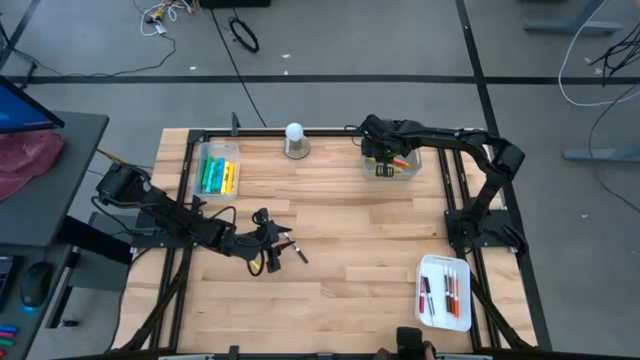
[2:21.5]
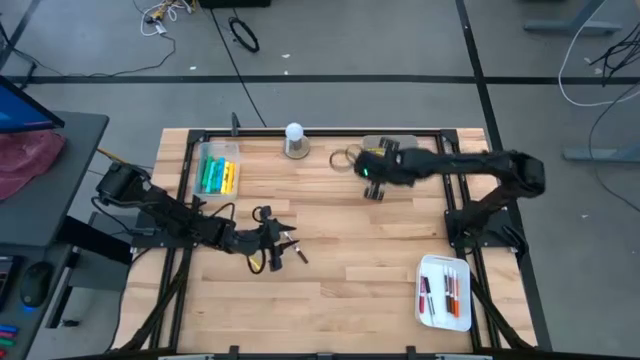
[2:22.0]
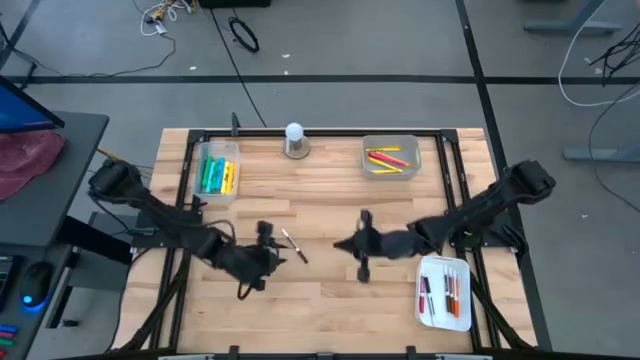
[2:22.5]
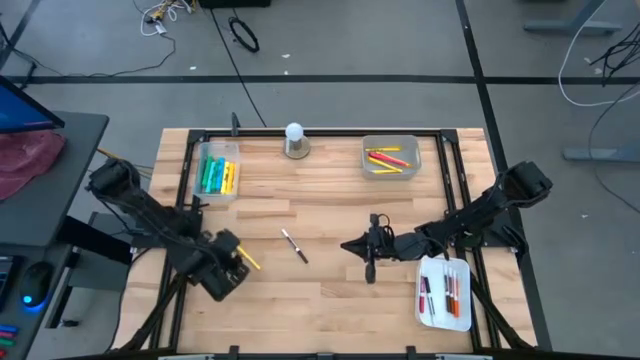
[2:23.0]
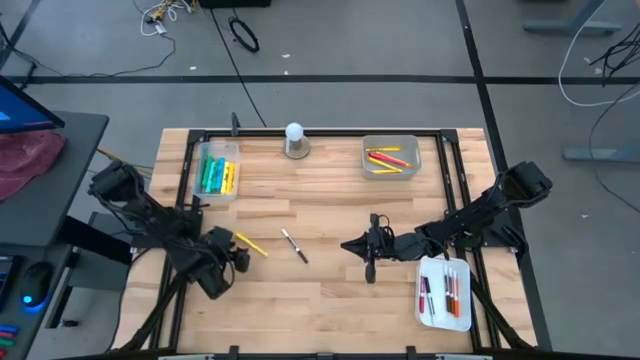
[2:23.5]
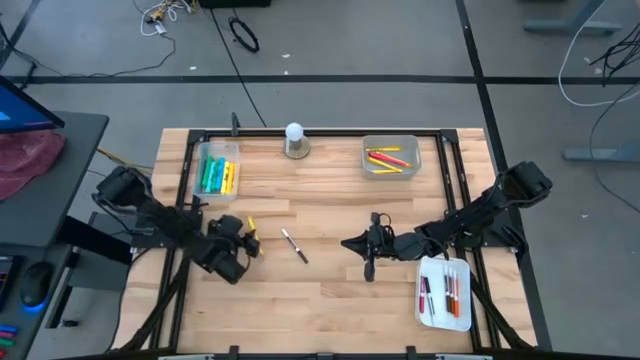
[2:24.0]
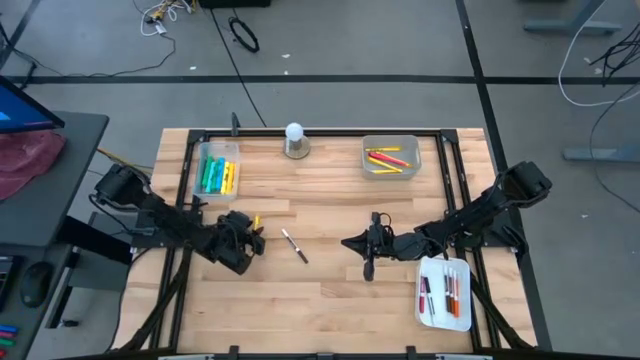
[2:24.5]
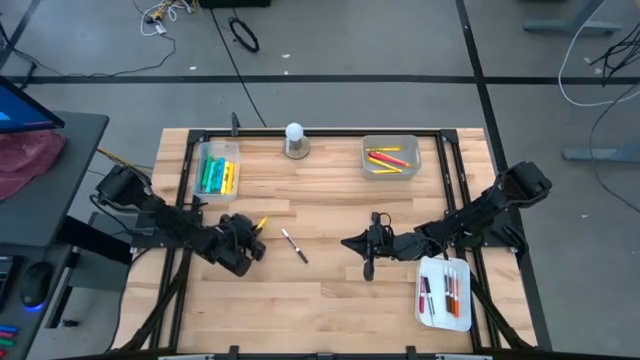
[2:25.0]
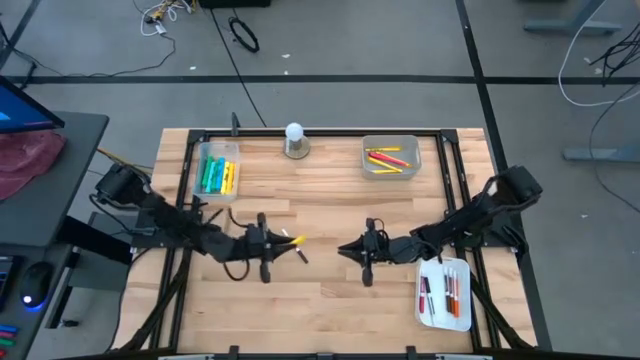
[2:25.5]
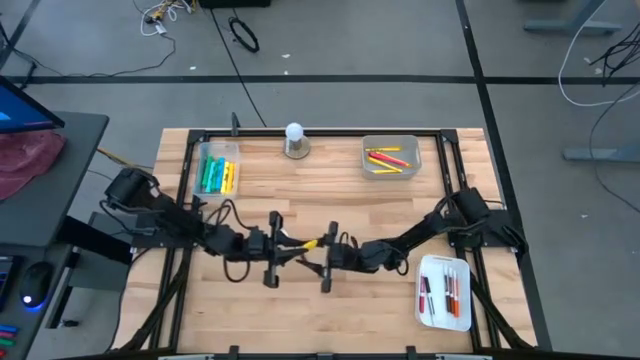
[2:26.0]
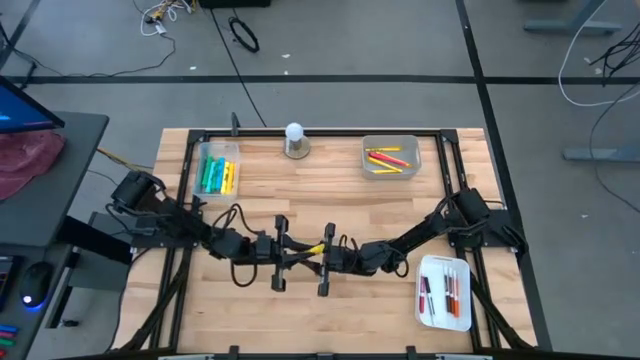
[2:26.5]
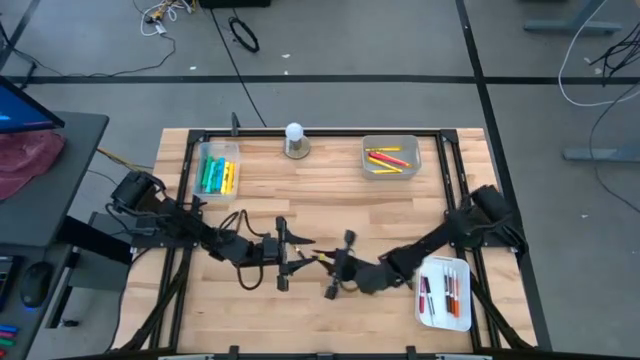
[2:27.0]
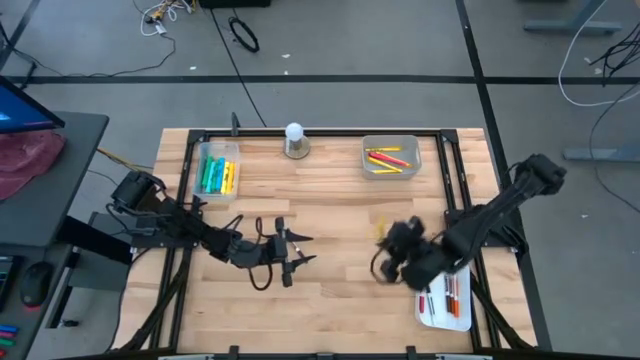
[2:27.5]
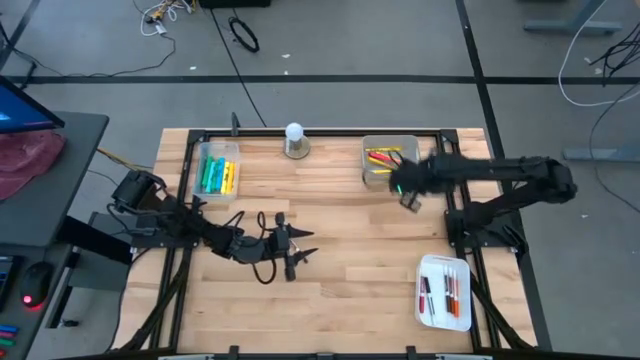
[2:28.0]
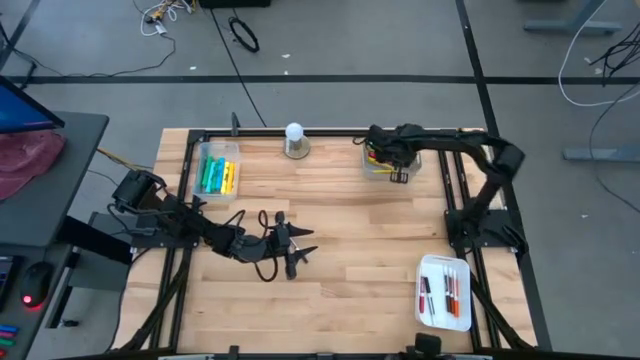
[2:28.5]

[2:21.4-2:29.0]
Task: Pick & Place Markers
Put the yellow pen into the gray bin

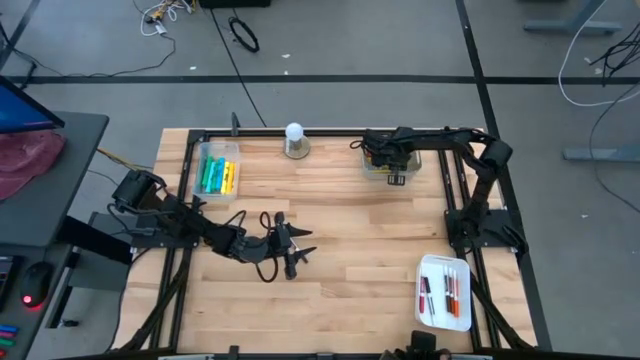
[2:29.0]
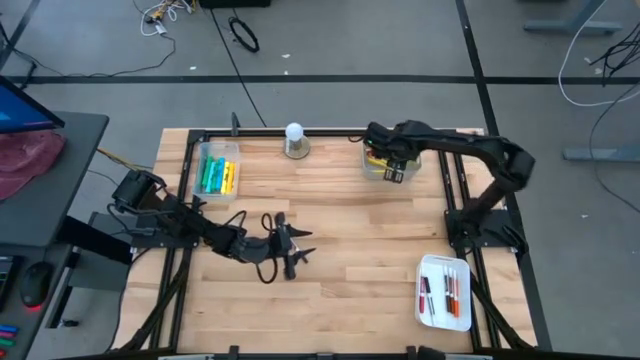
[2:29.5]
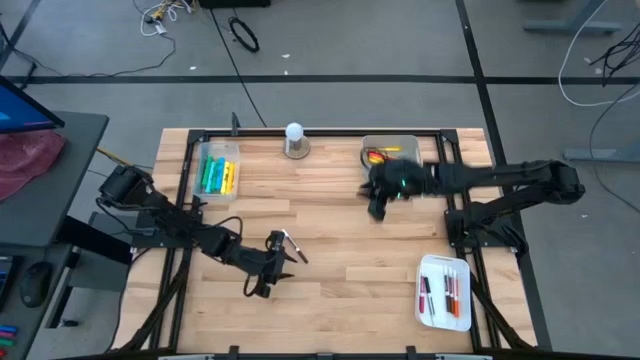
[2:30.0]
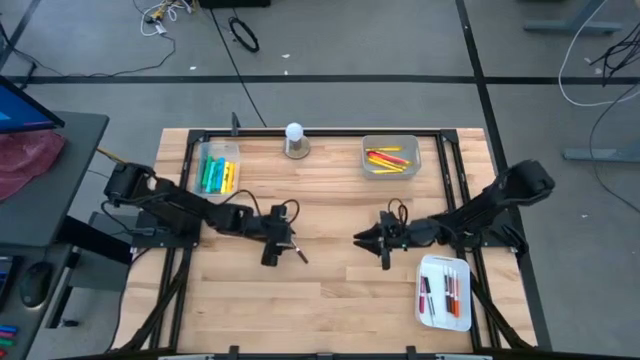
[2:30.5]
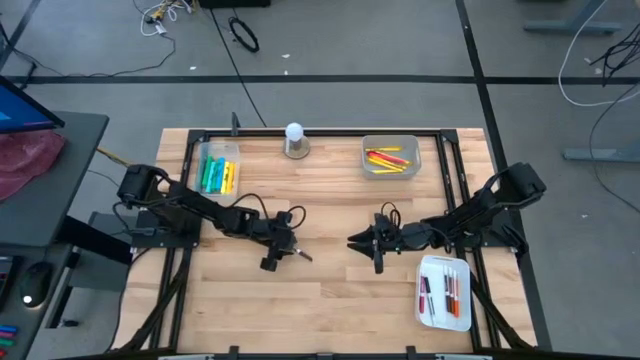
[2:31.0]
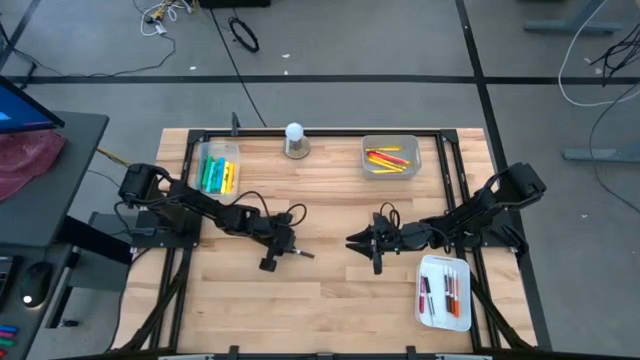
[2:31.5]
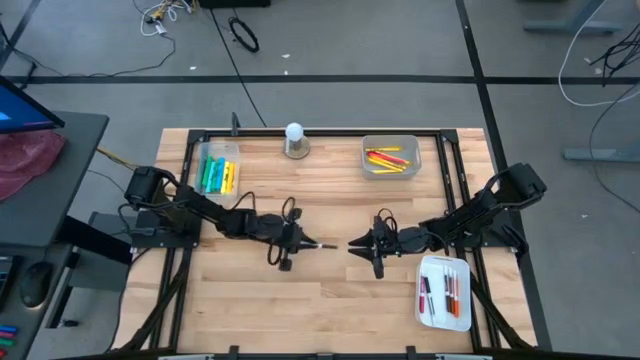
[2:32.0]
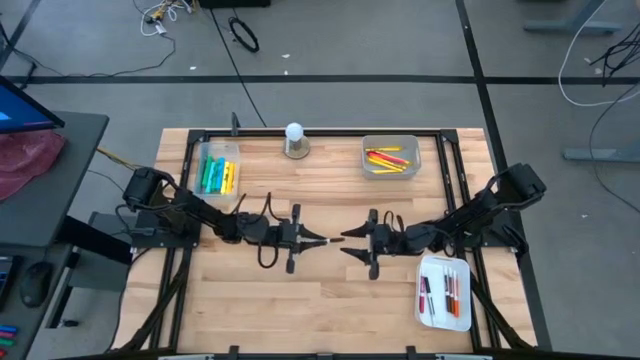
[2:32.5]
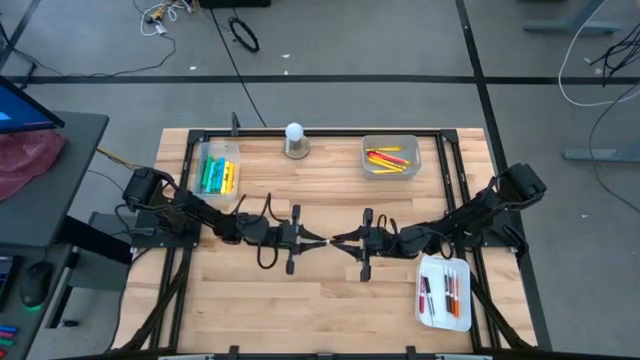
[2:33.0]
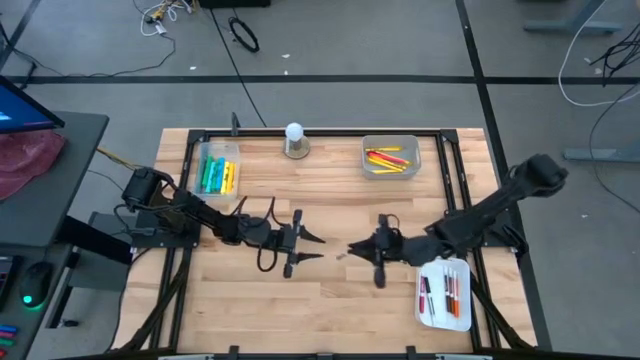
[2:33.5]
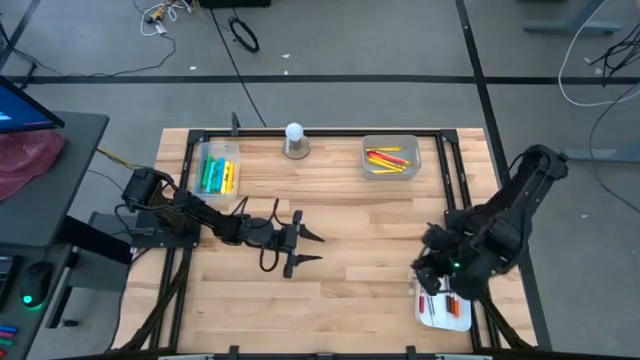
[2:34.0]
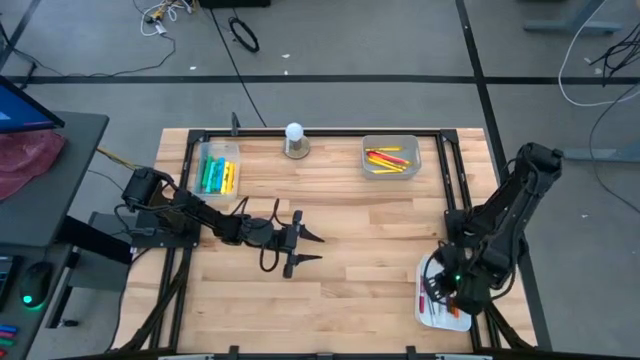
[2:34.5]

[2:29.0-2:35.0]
Put the brown marker into the white bin

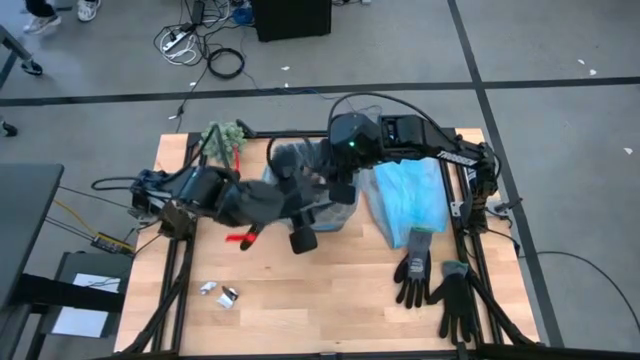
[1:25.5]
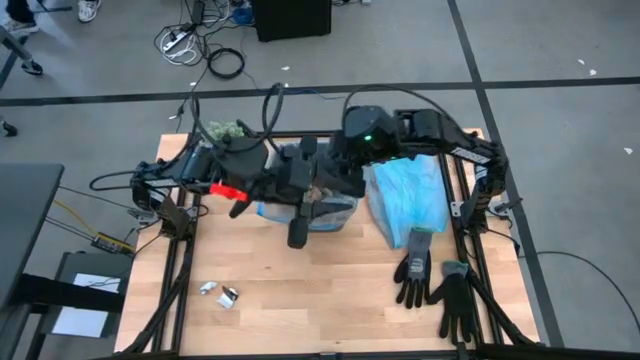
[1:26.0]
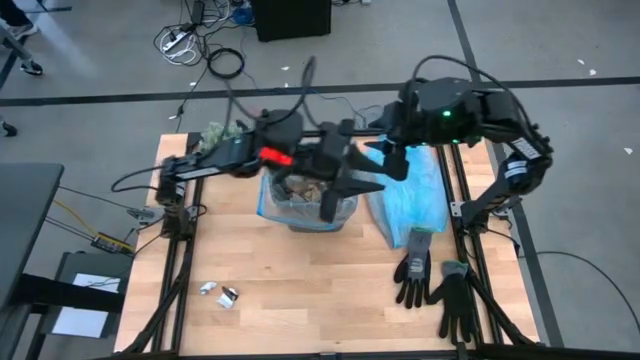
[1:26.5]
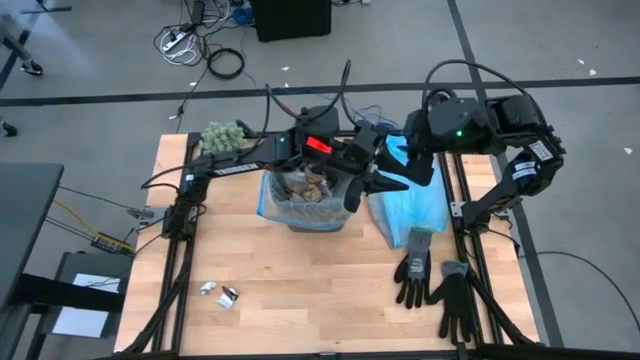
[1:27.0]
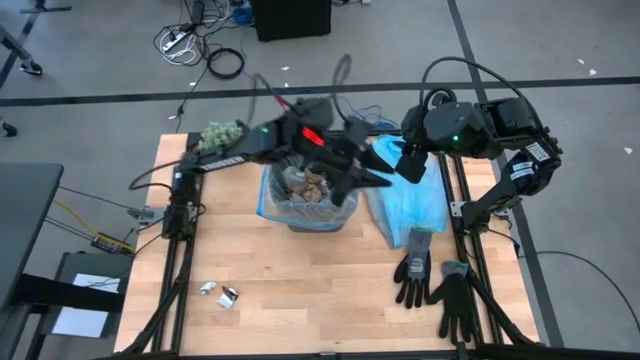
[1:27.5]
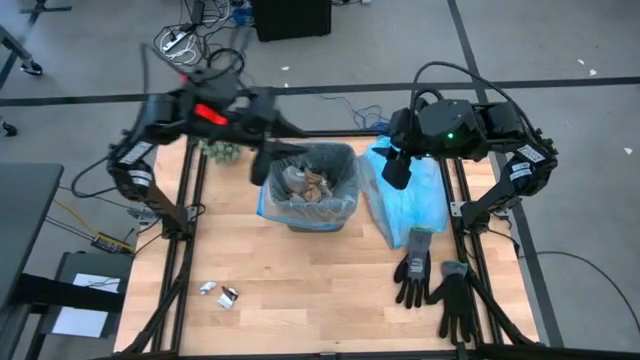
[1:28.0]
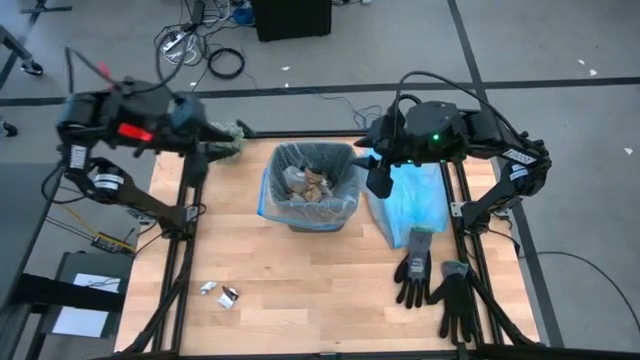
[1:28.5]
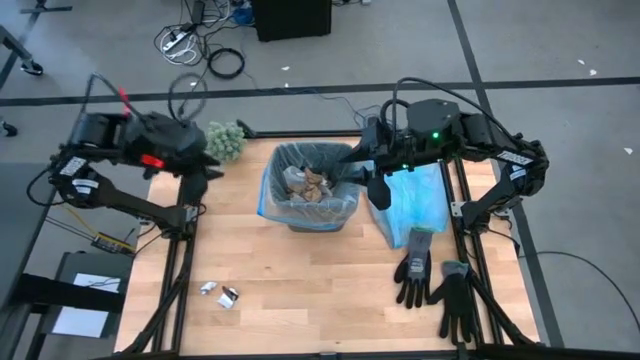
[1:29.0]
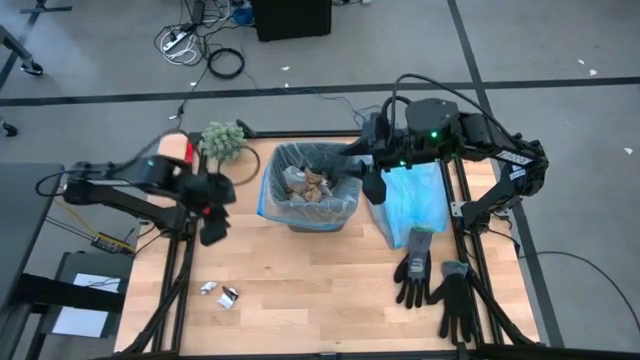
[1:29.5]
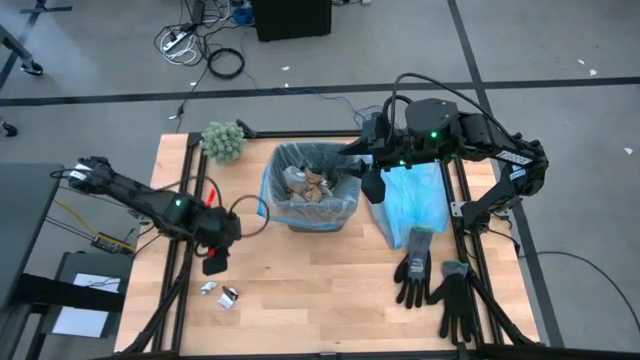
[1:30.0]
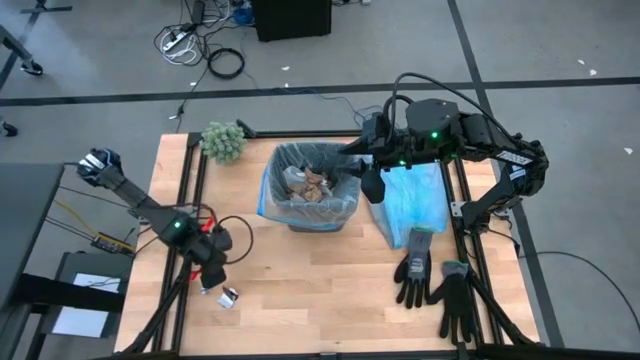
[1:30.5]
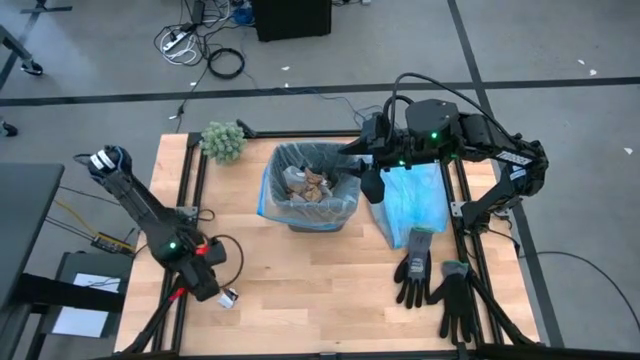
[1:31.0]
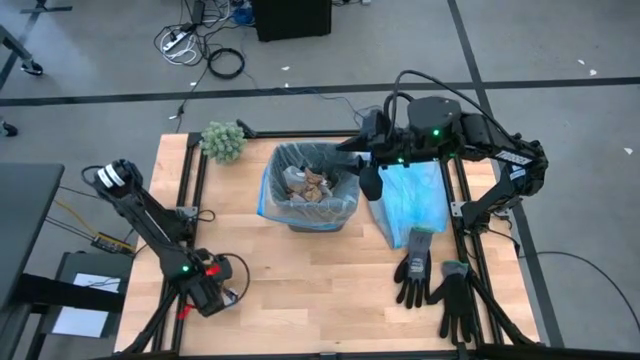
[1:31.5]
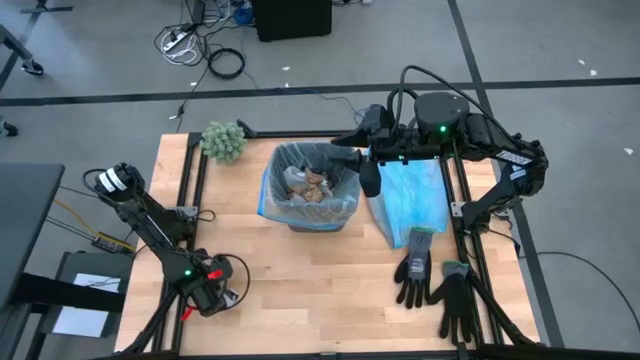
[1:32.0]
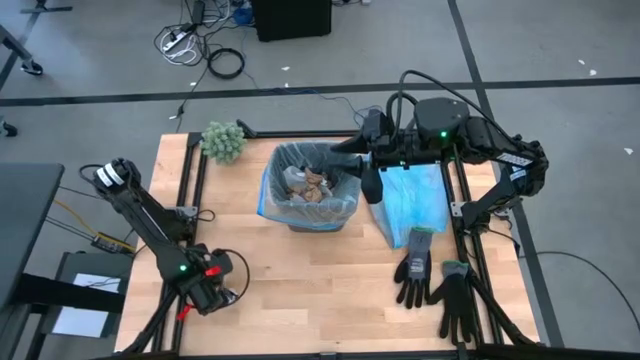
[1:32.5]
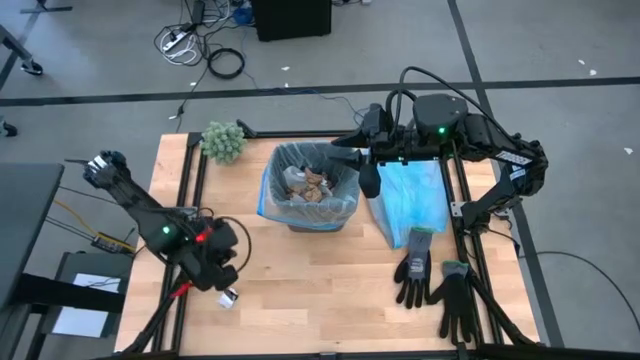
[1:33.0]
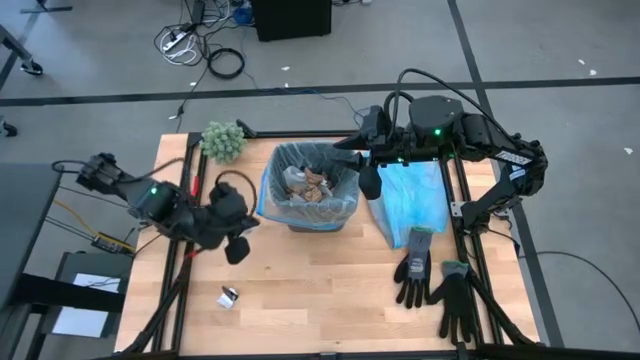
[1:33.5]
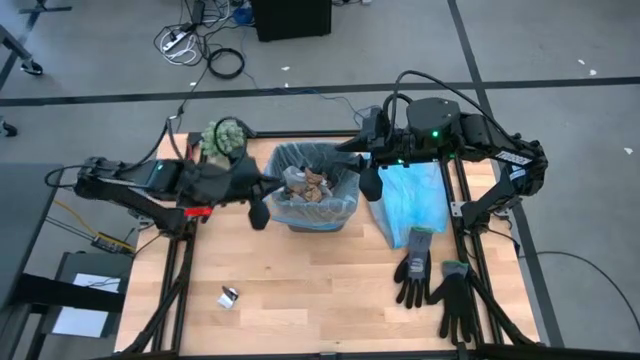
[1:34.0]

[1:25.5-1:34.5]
Task: place trash/remove bag and relplace
Put the white paper into the trash bin
